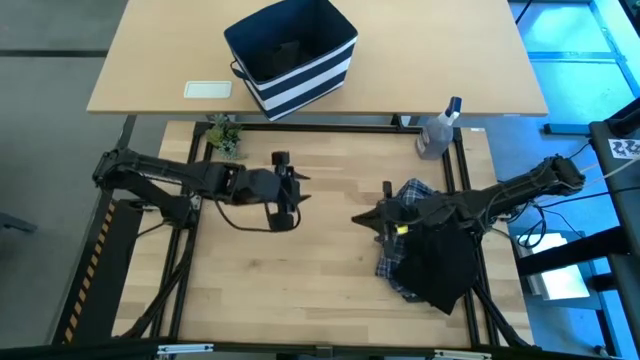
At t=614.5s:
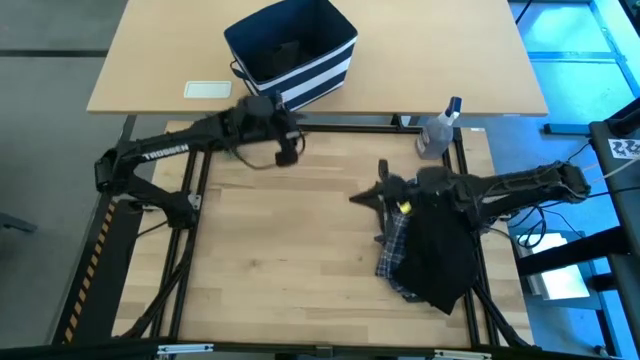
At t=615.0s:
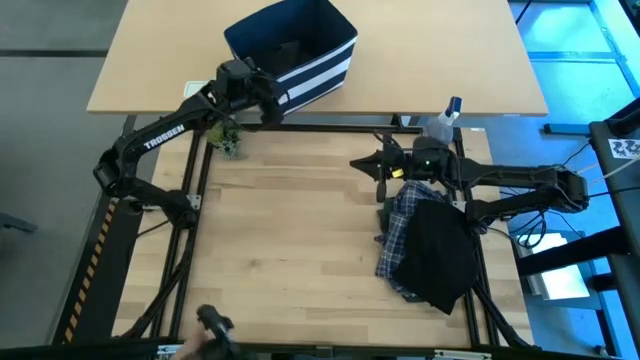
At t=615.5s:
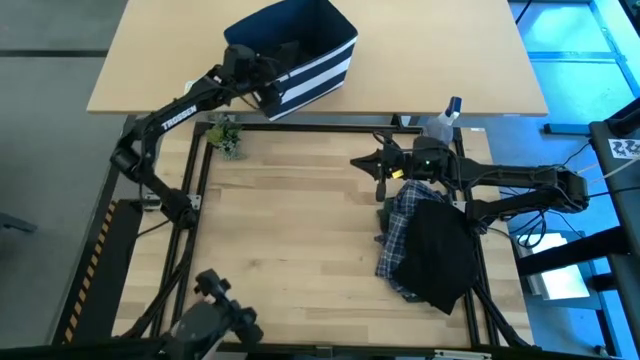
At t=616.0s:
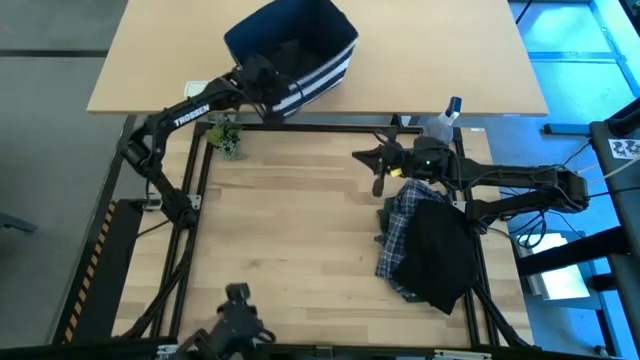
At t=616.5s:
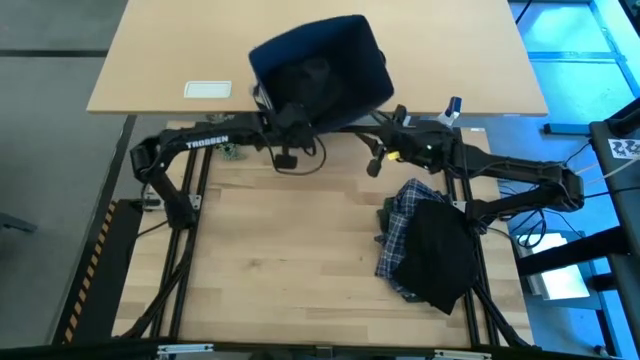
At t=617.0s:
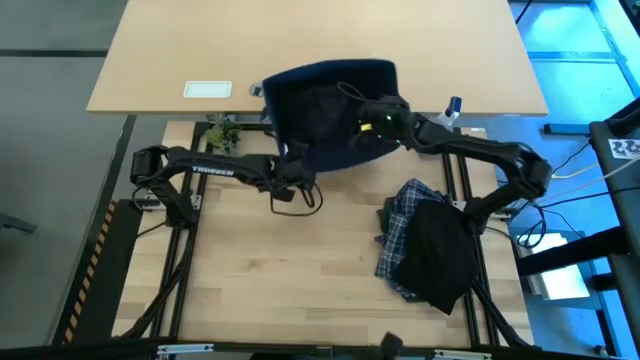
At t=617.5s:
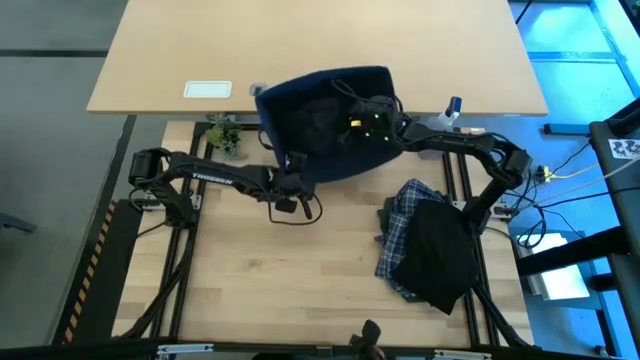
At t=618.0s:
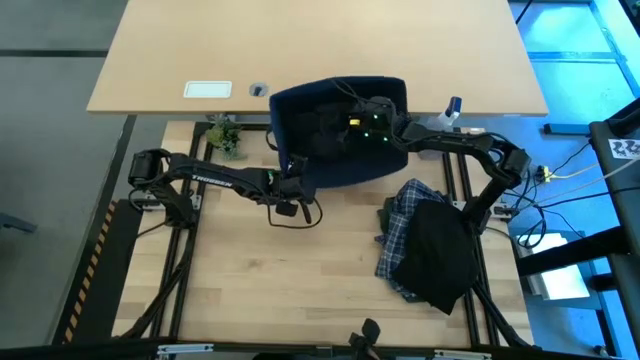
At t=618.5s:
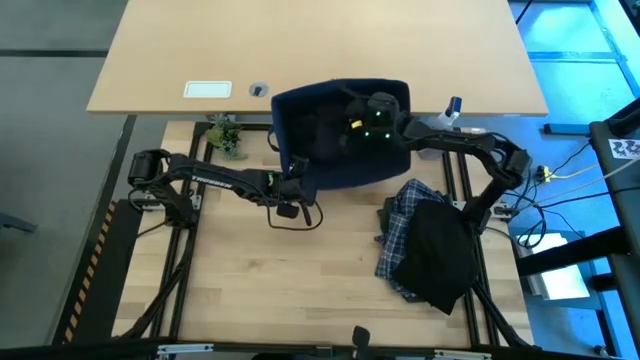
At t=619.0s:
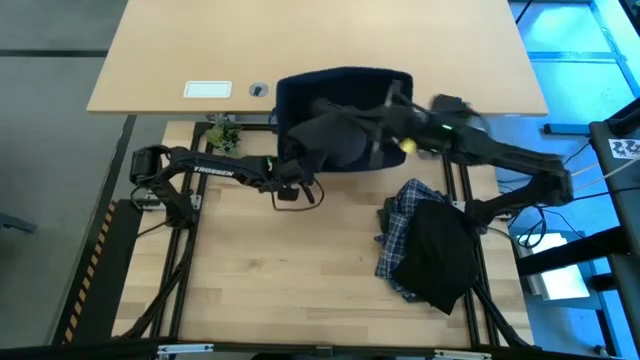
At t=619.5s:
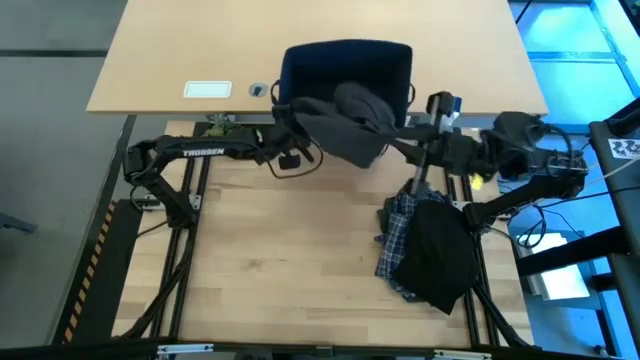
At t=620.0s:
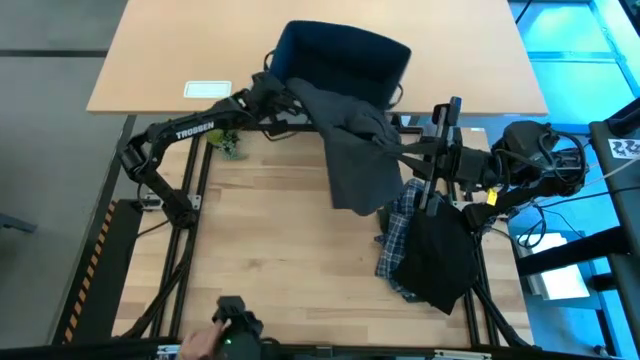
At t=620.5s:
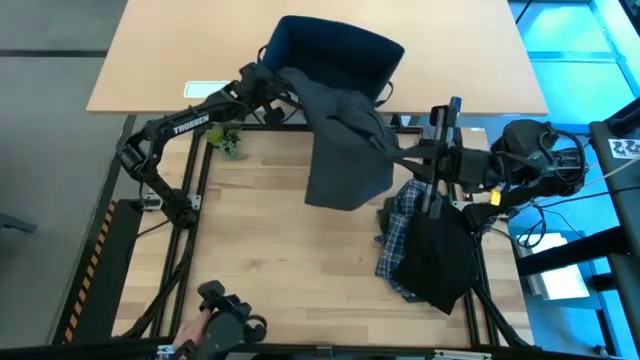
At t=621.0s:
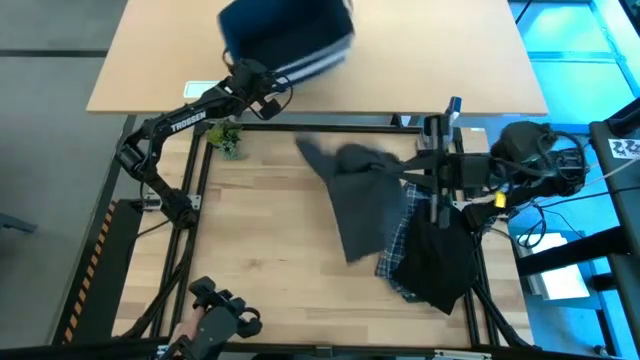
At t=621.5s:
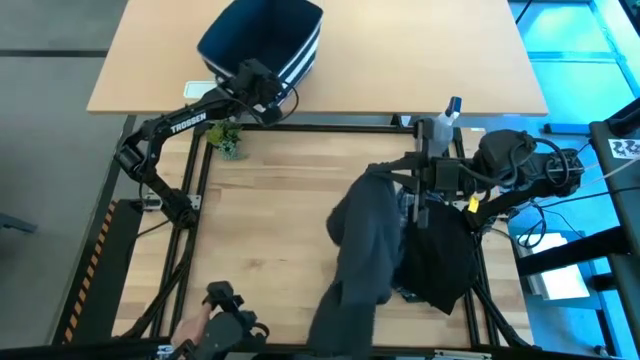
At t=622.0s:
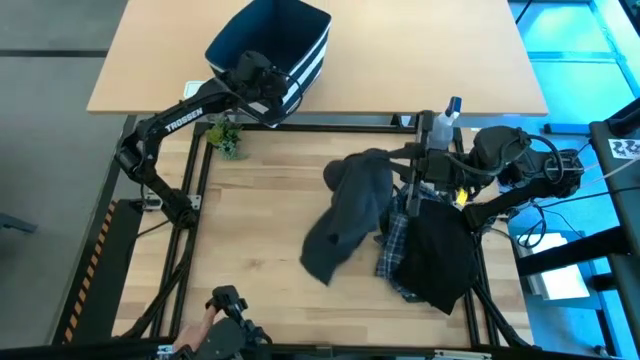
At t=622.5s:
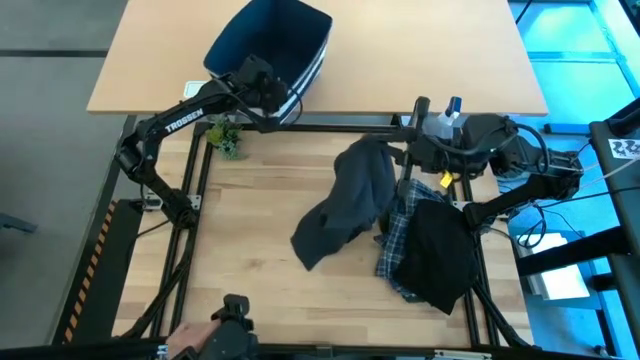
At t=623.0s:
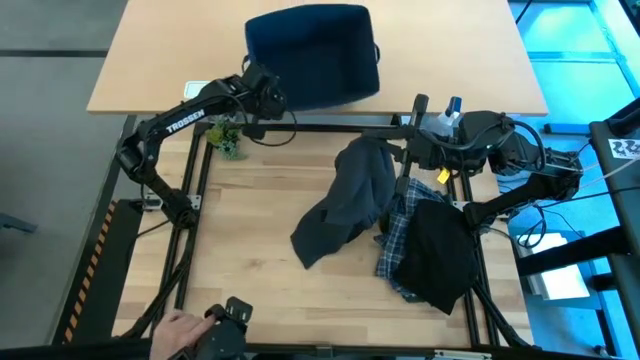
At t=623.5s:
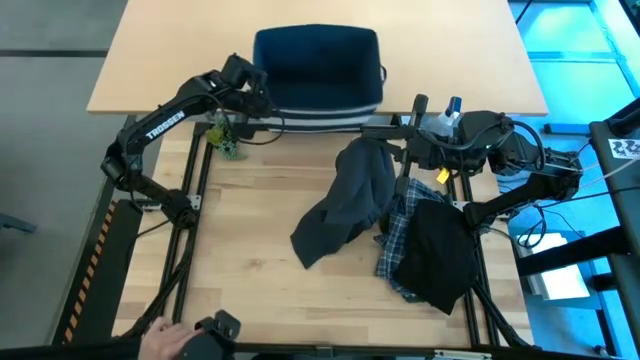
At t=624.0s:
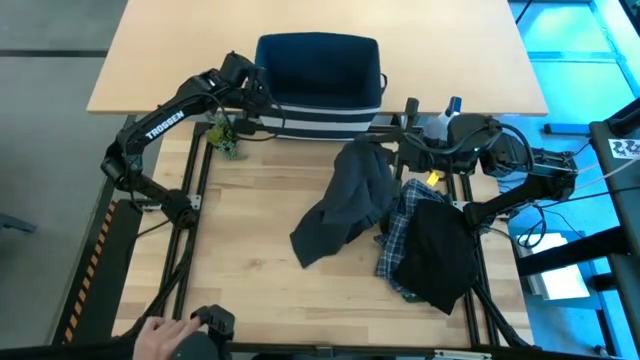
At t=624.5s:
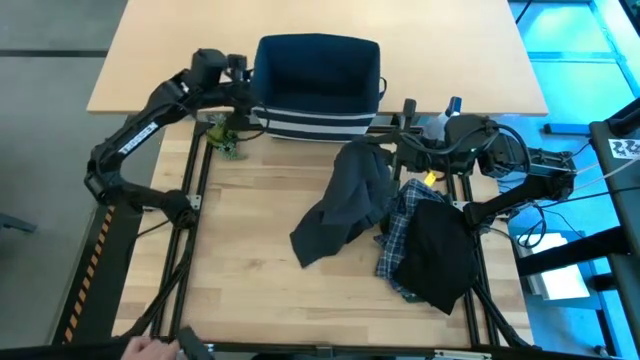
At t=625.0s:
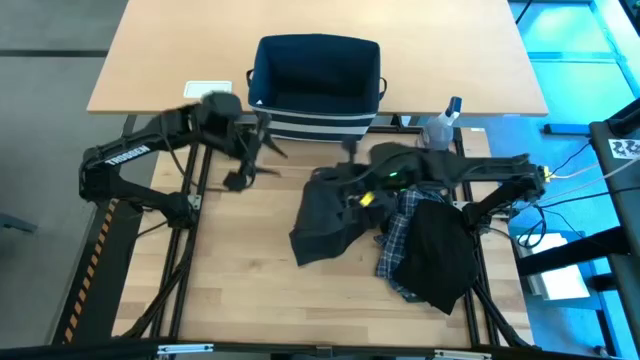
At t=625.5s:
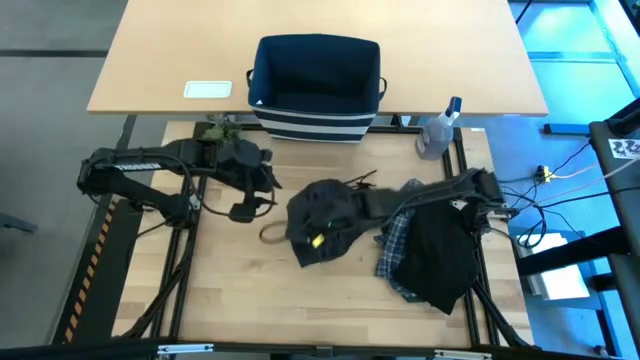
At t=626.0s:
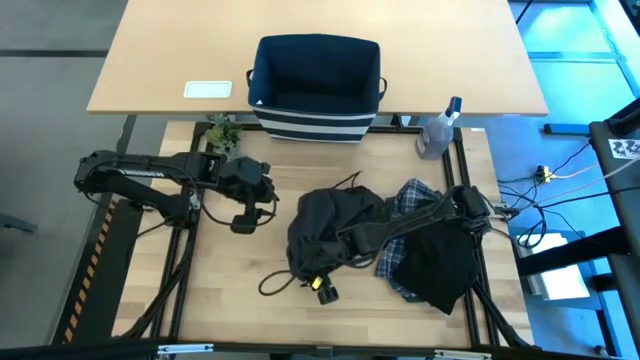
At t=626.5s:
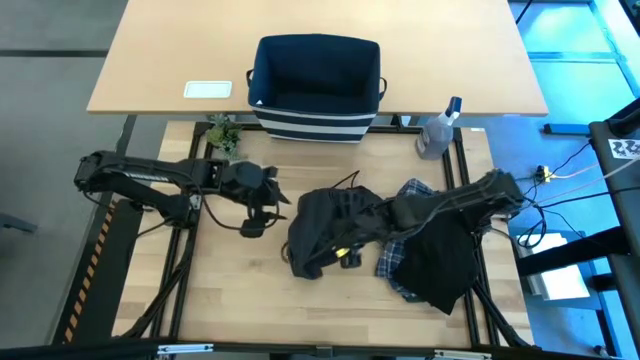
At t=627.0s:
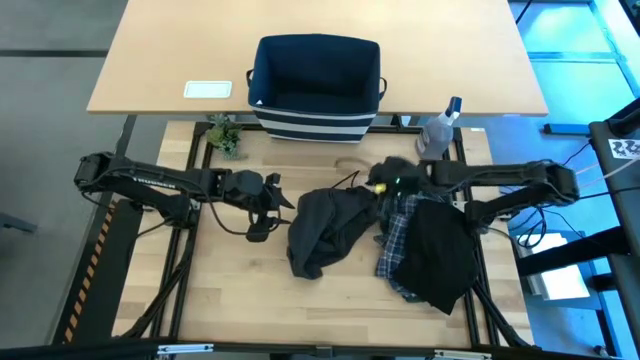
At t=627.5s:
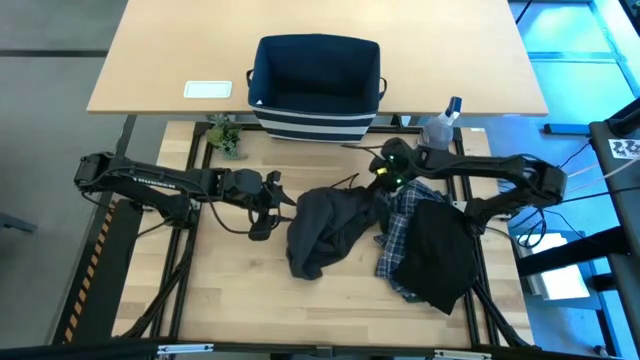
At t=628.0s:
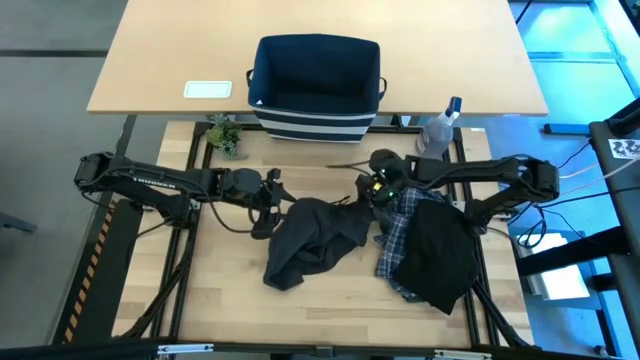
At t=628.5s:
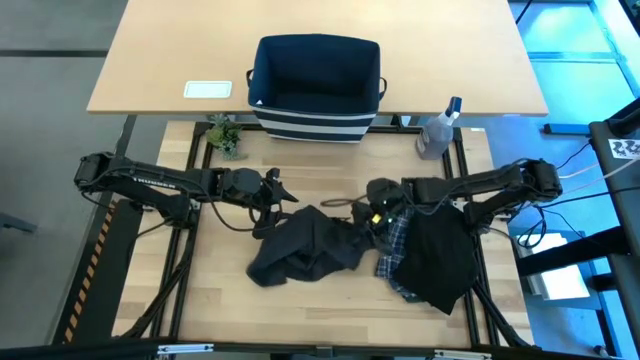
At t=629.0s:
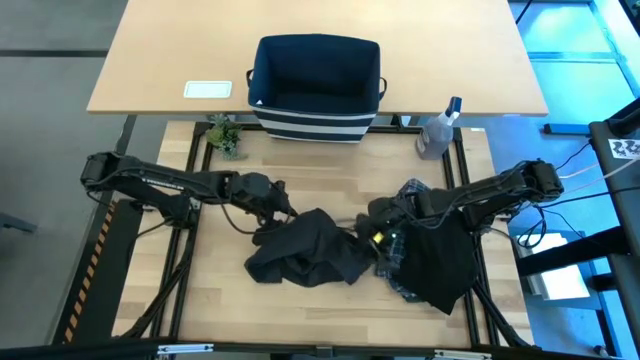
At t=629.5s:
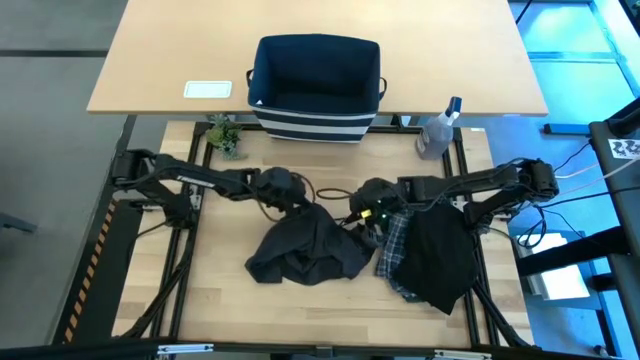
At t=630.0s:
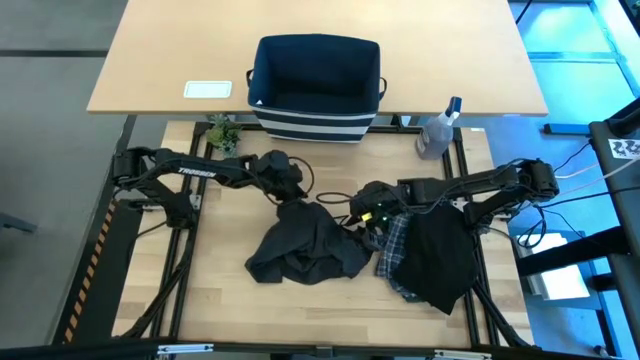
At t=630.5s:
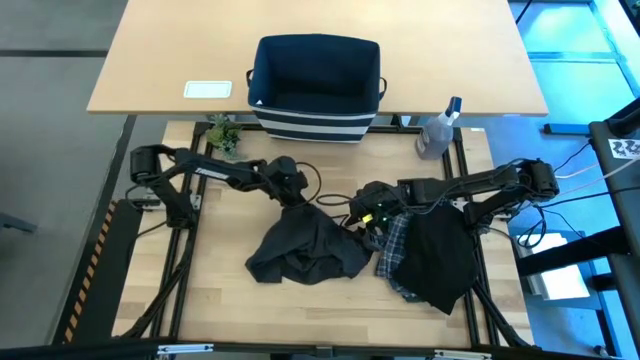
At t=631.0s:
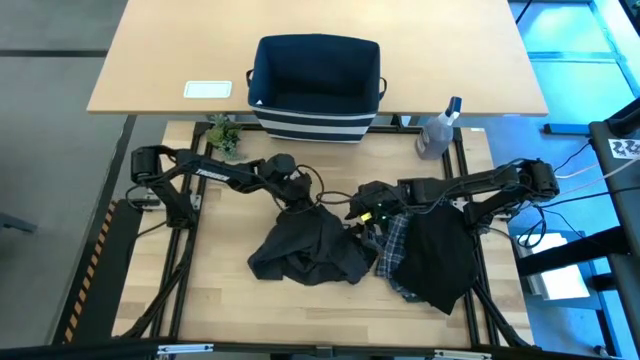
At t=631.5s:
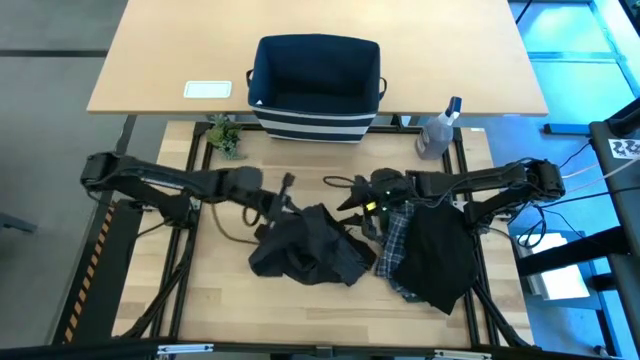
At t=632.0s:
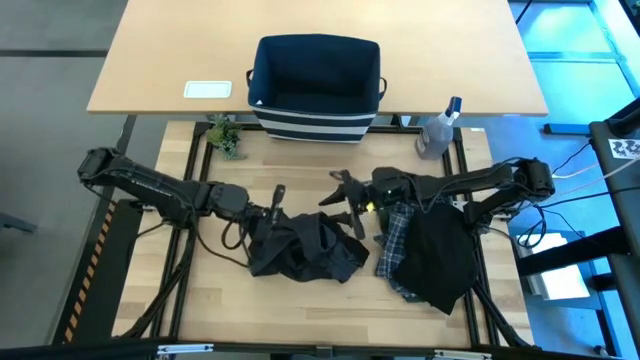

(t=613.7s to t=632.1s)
Task: Fold Laundry from Bin
Fold the black shorts

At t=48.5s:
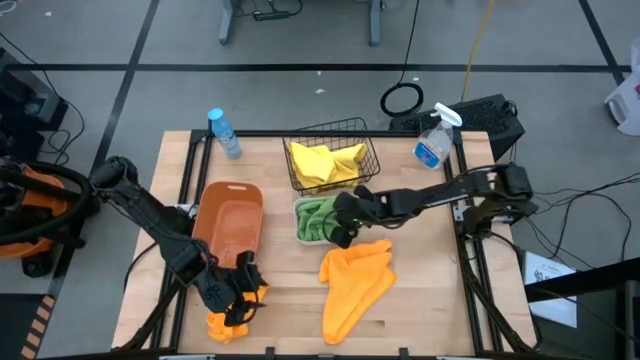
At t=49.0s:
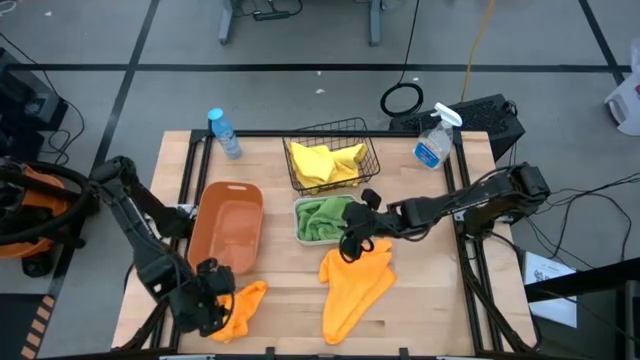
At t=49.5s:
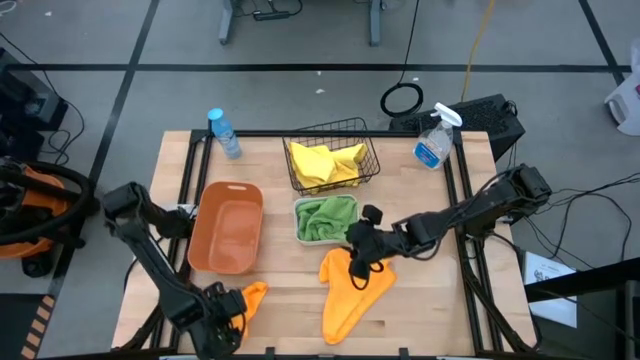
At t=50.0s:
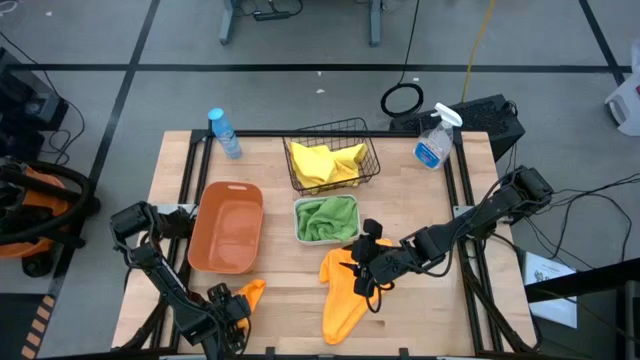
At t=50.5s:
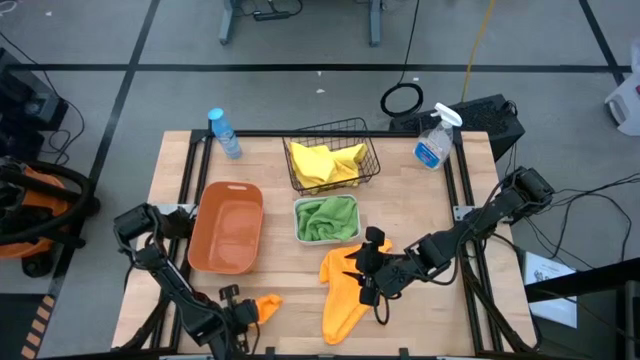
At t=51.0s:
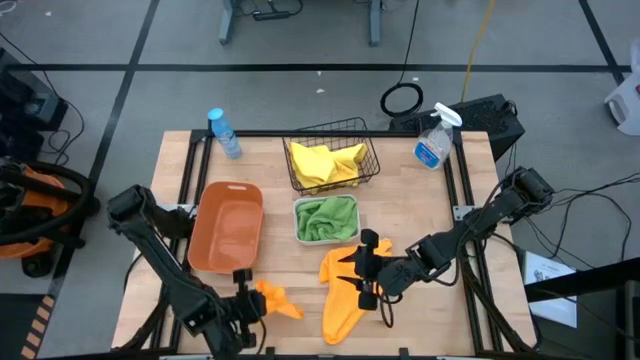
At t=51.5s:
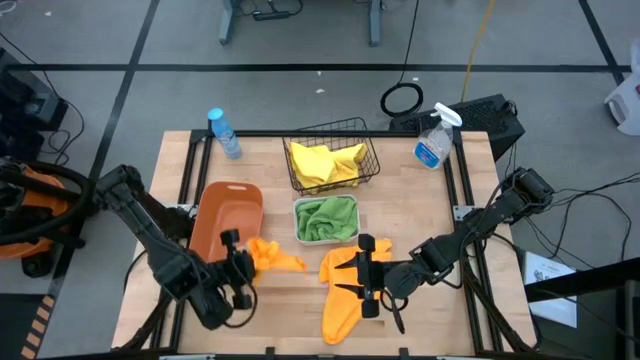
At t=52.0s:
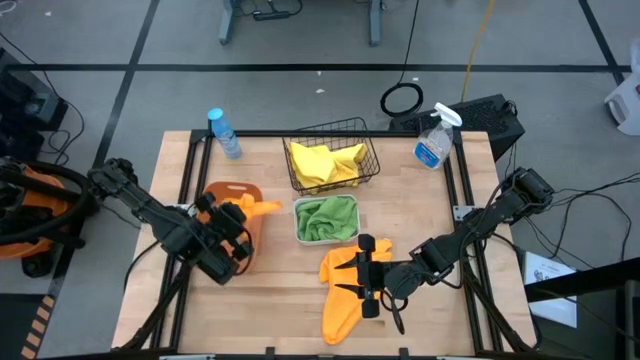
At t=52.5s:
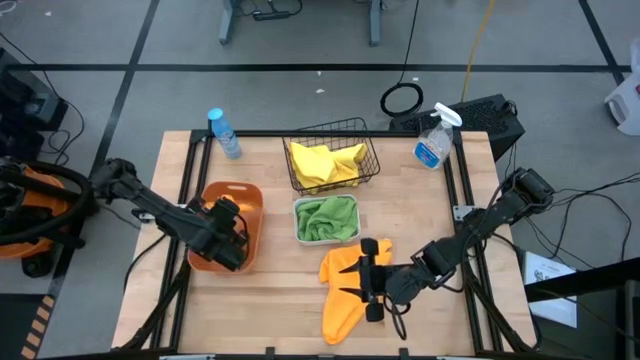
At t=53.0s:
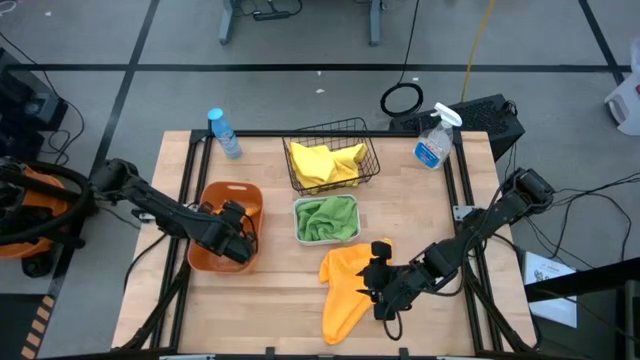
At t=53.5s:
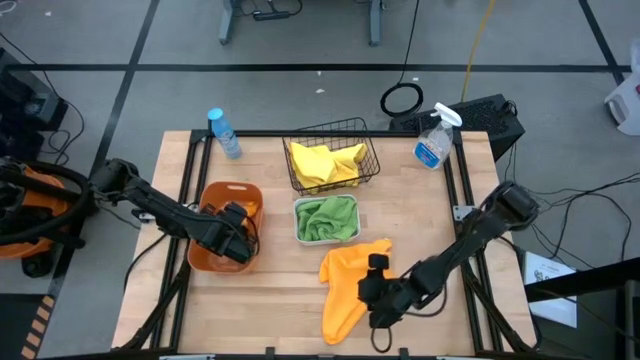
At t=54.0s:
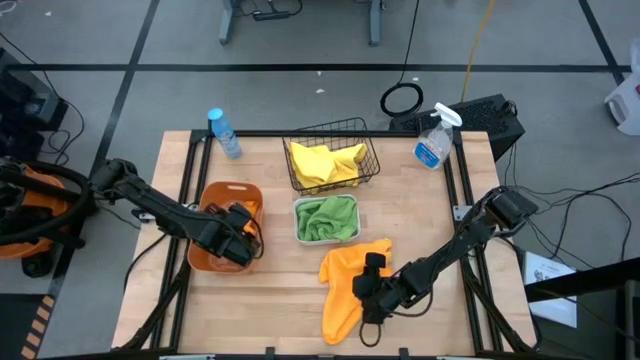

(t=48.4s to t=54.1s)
Task: Sort microfiber towel by color & place in baskets
Put the left orange towel into the orange bin
